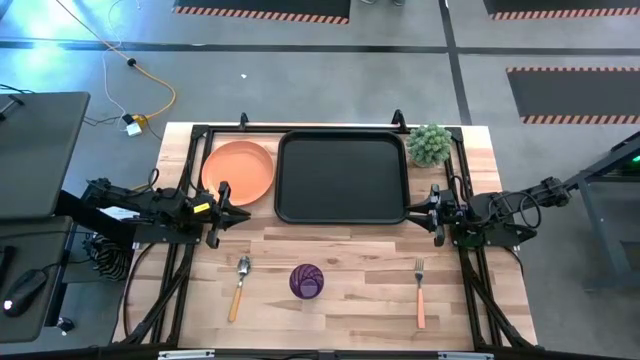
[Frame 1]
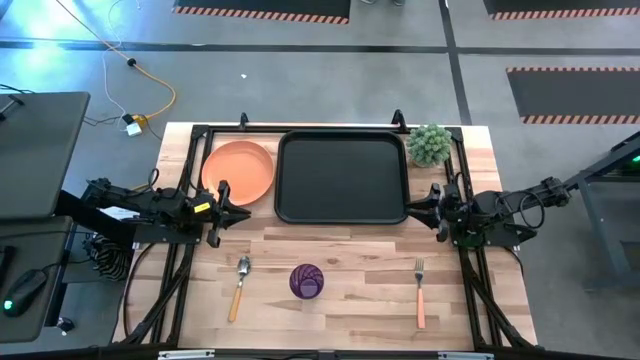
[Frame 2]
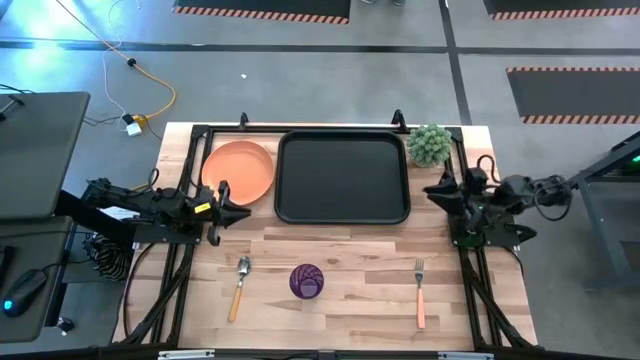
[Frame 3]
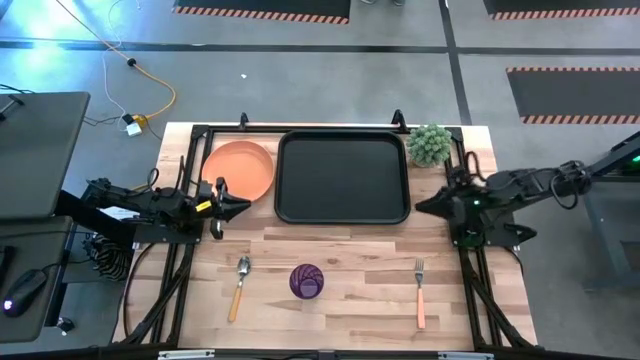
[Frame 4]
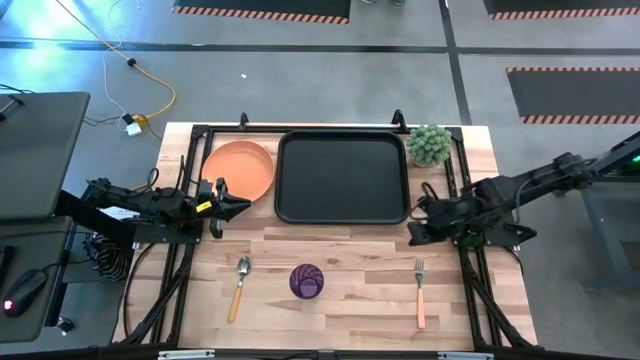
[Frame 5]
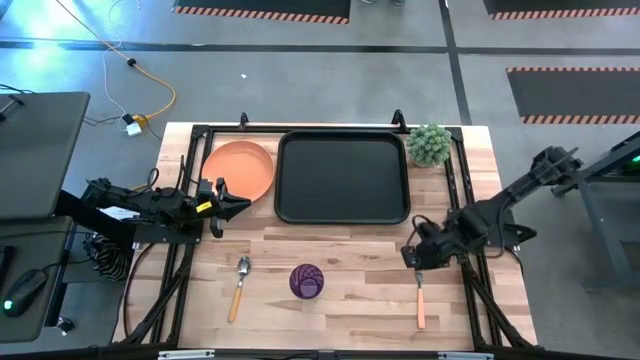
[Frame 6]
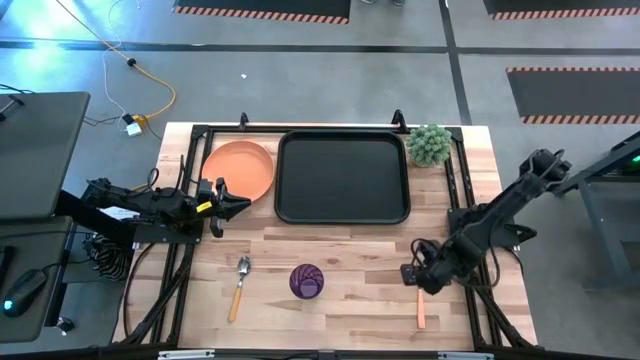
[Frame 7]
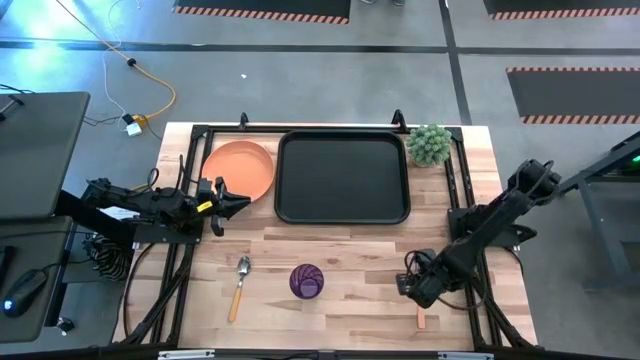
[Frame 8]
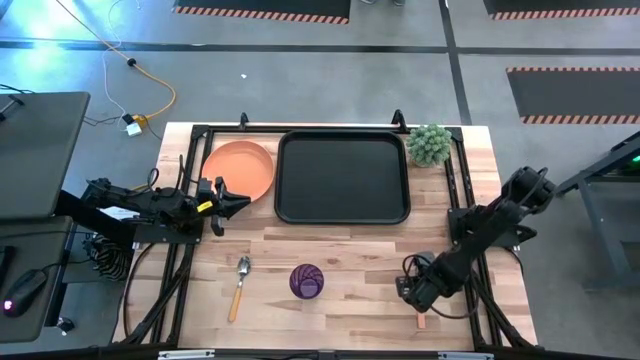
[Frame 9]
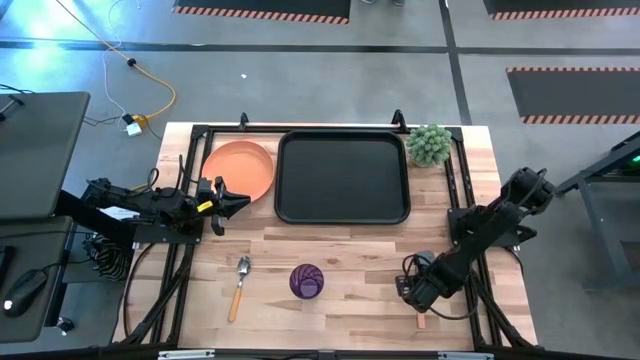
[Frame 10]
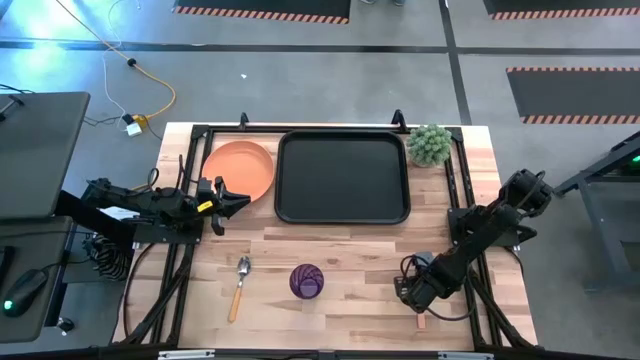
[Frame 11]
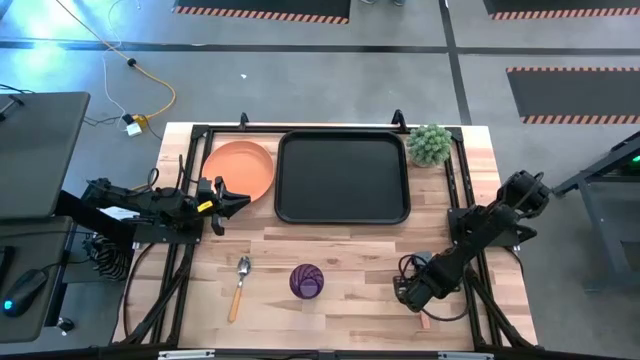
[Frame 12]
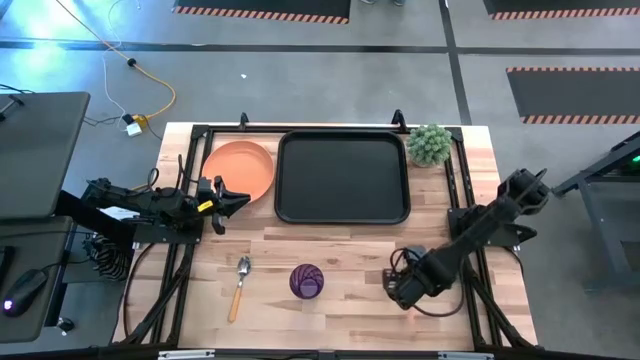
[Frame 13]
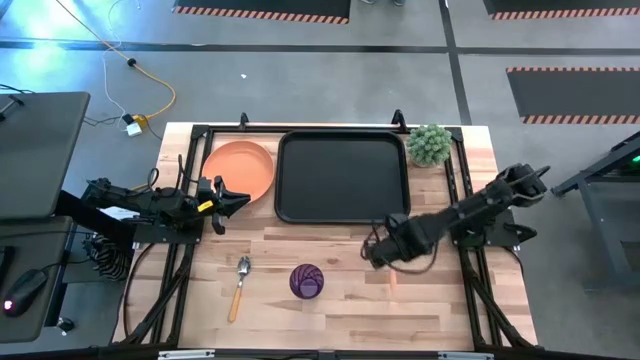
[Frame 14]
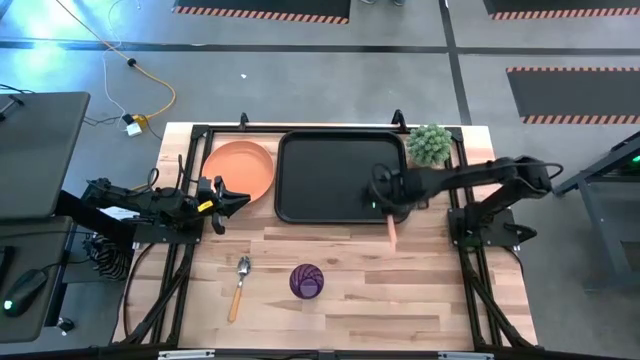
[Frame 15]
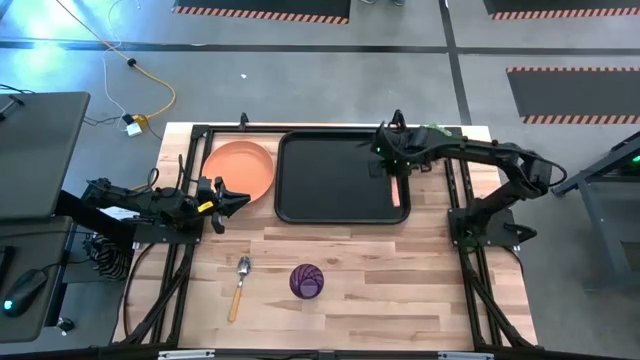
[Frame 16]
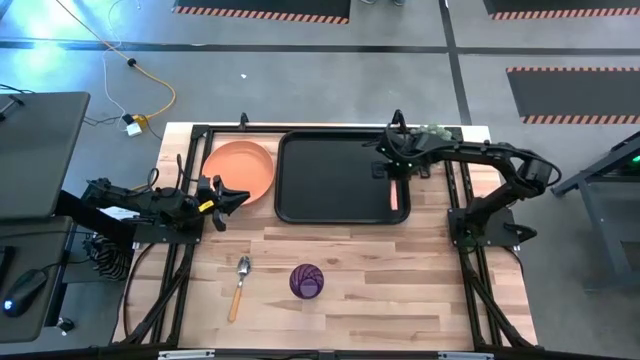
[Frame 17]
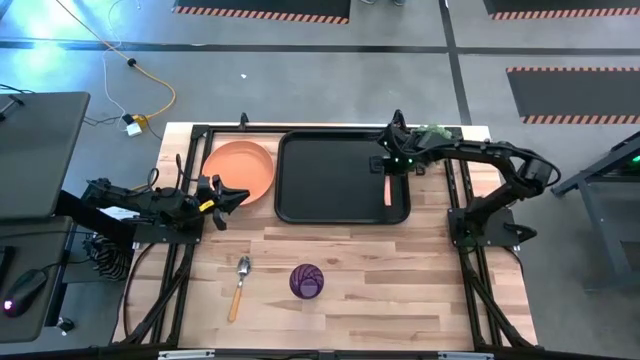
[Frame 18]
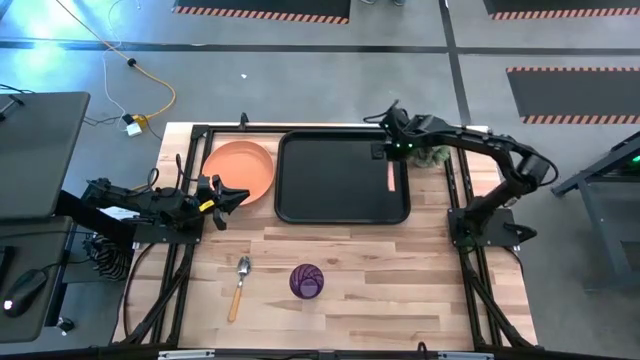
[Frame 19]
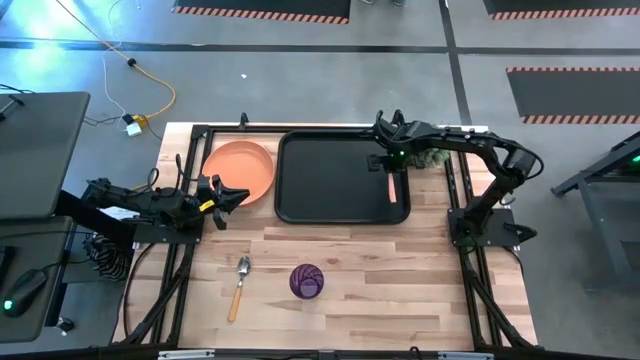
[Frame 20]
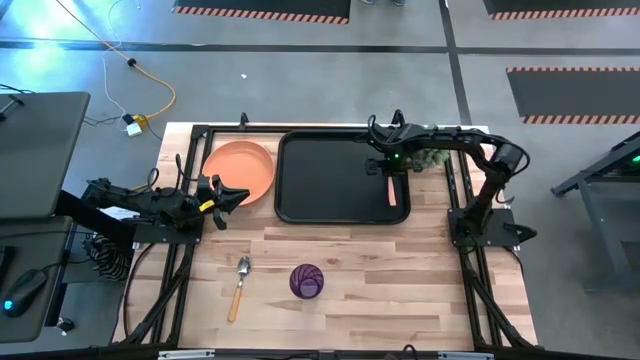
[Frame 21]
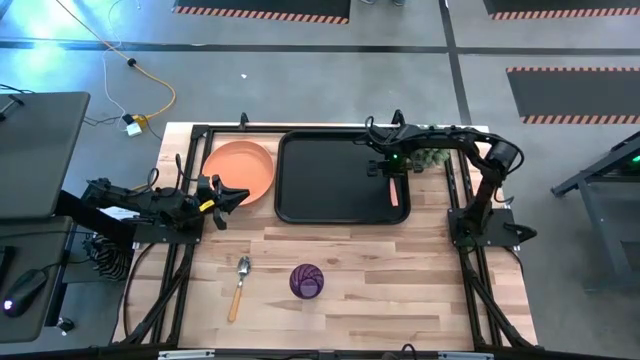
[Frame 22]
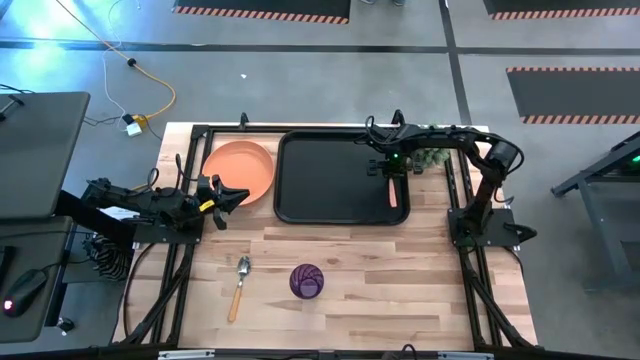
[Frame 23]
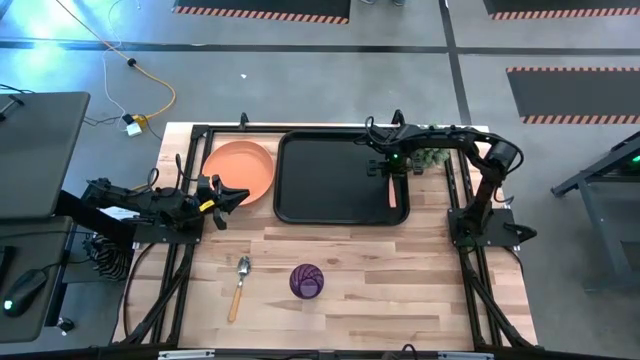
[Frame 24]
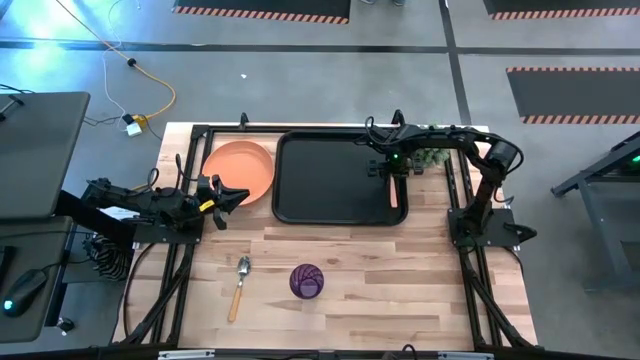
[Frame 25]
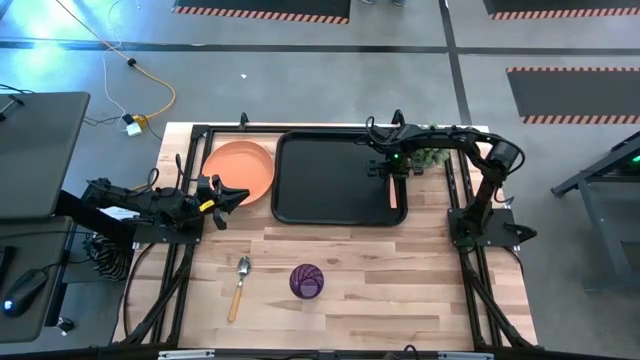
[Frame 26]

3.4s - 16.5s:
Task: Pick and place plate/cup/fork/spoon on tray
Put the orange fork on the black serving tray
